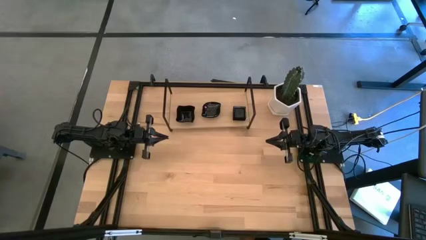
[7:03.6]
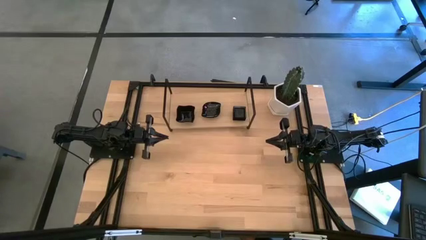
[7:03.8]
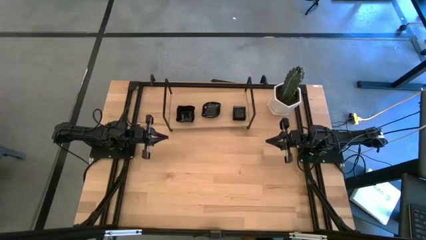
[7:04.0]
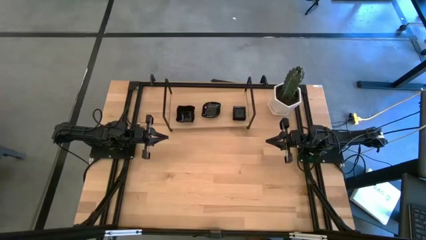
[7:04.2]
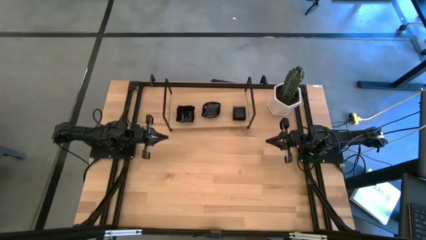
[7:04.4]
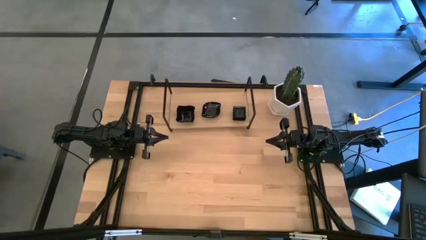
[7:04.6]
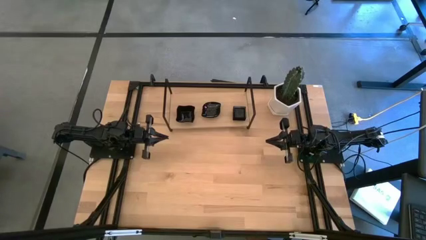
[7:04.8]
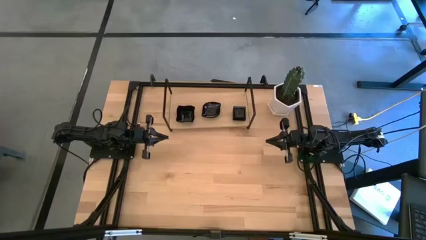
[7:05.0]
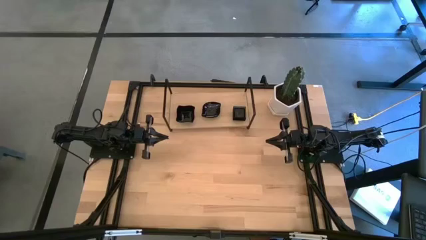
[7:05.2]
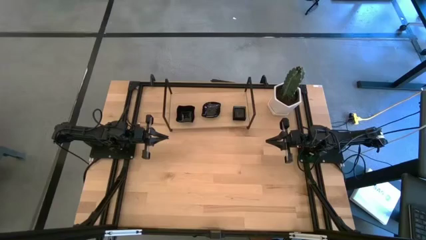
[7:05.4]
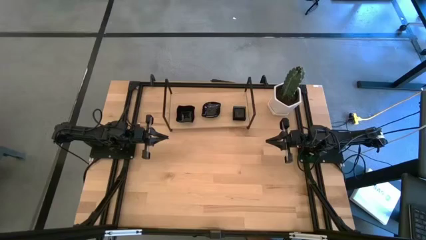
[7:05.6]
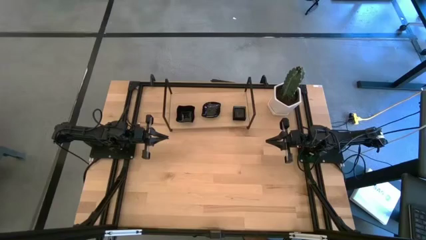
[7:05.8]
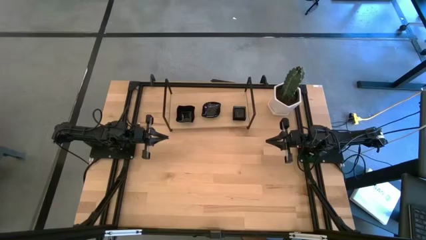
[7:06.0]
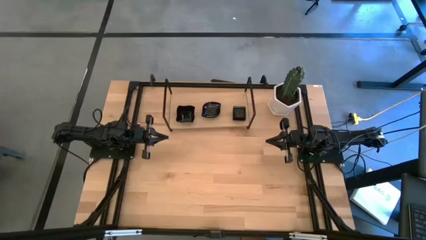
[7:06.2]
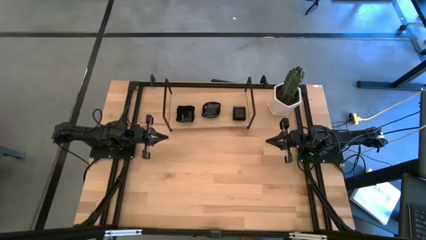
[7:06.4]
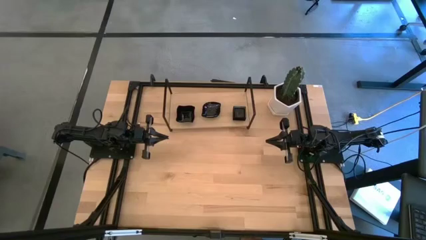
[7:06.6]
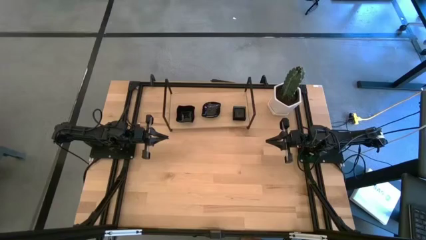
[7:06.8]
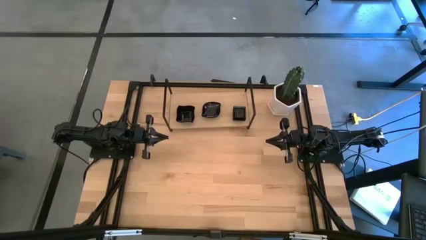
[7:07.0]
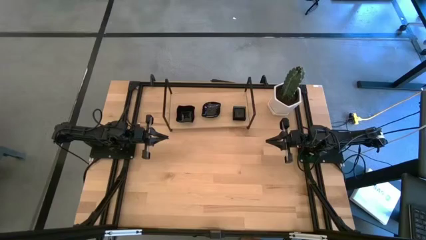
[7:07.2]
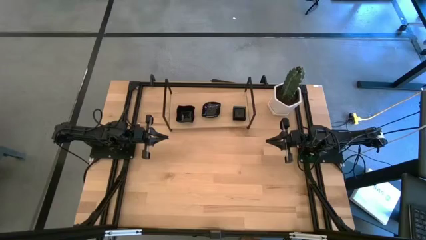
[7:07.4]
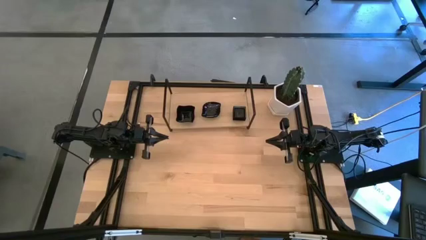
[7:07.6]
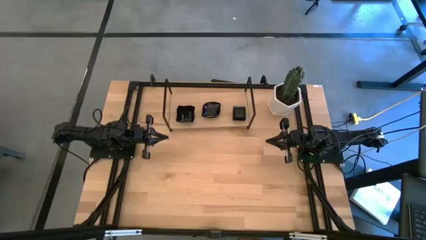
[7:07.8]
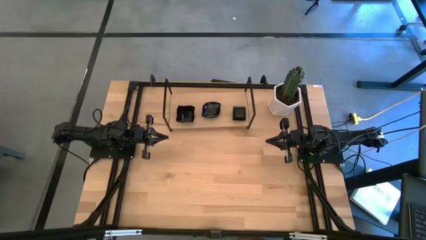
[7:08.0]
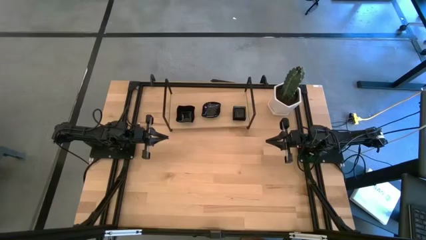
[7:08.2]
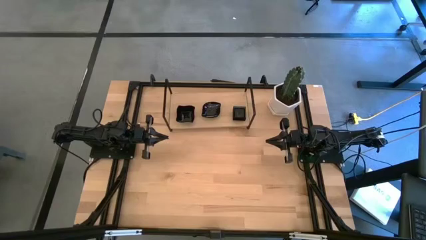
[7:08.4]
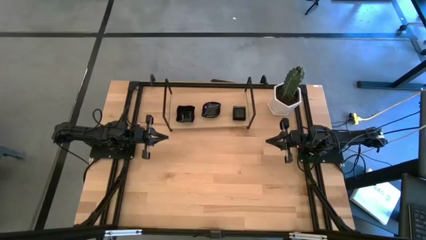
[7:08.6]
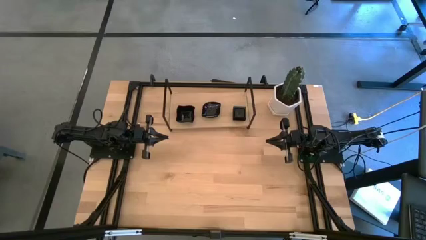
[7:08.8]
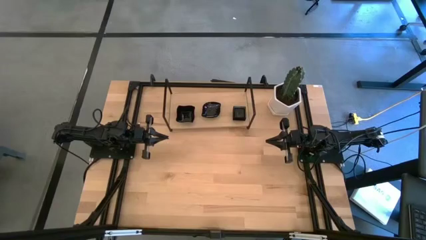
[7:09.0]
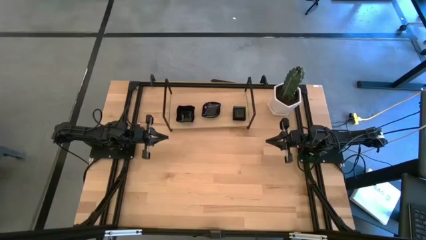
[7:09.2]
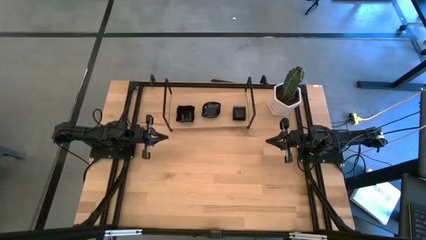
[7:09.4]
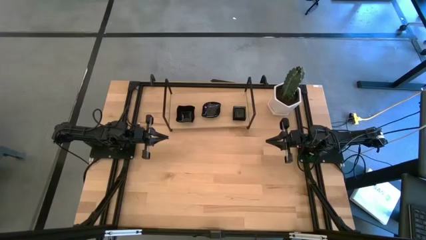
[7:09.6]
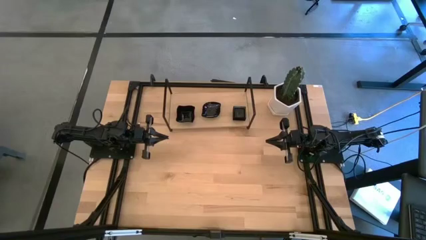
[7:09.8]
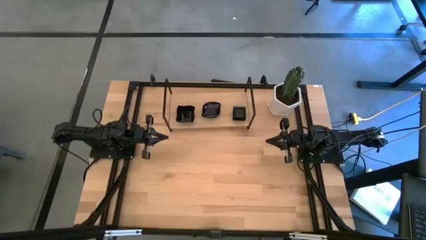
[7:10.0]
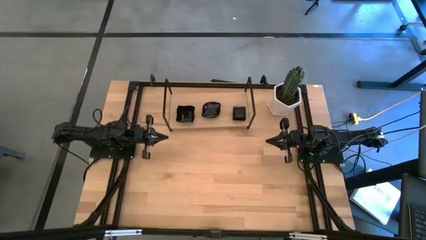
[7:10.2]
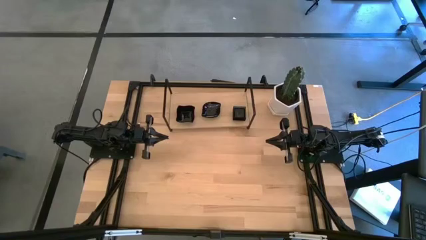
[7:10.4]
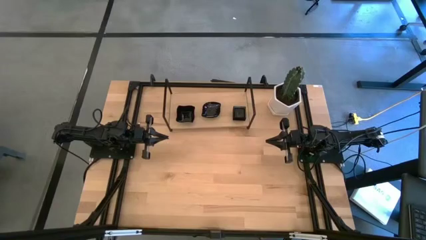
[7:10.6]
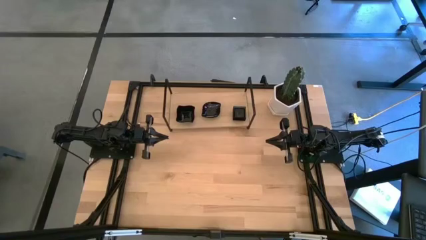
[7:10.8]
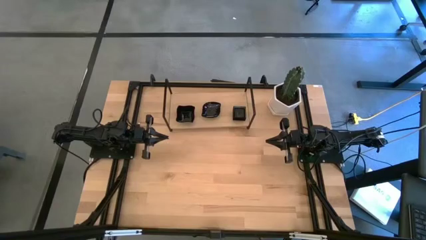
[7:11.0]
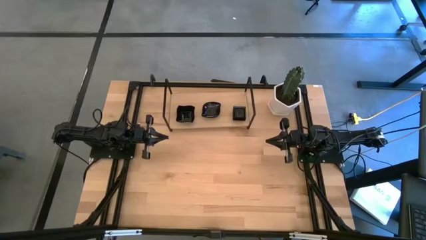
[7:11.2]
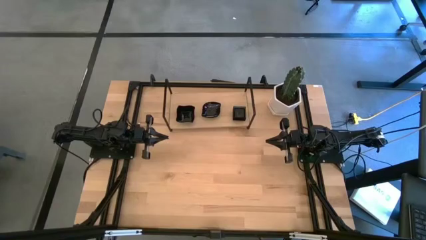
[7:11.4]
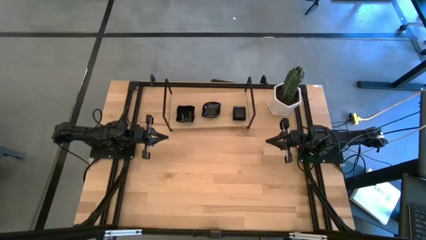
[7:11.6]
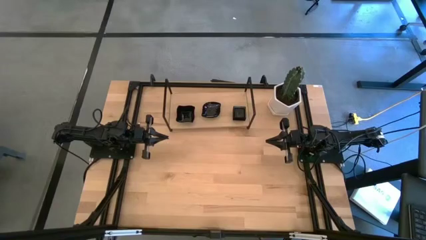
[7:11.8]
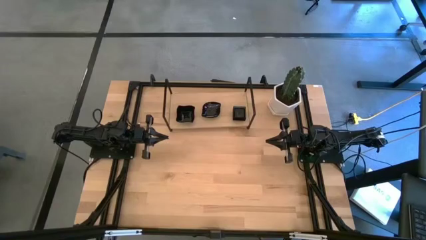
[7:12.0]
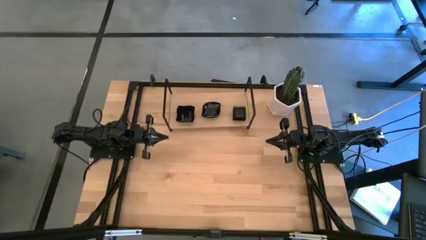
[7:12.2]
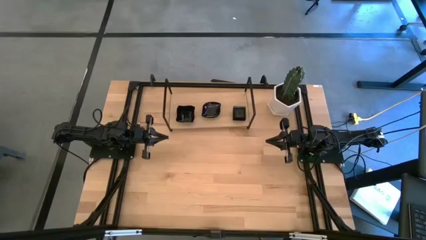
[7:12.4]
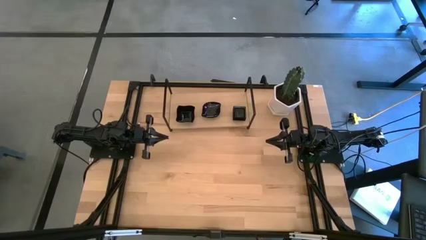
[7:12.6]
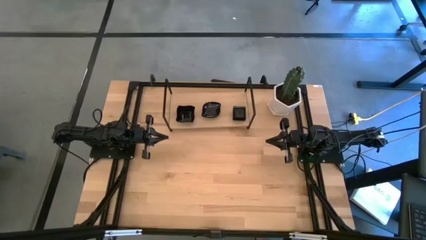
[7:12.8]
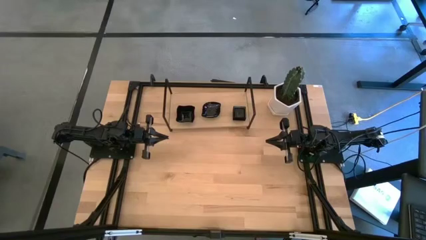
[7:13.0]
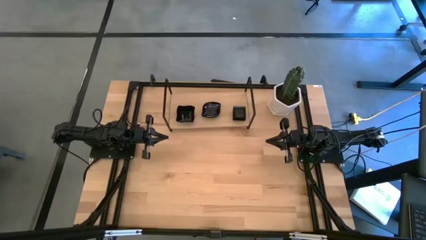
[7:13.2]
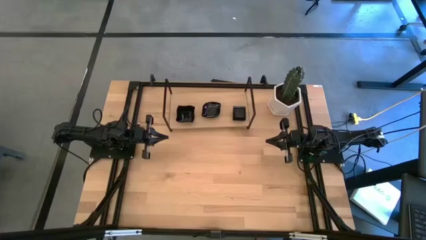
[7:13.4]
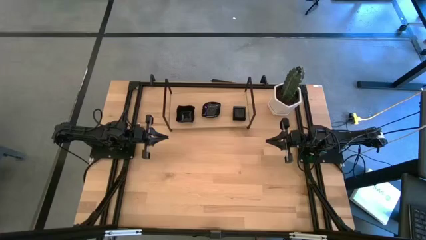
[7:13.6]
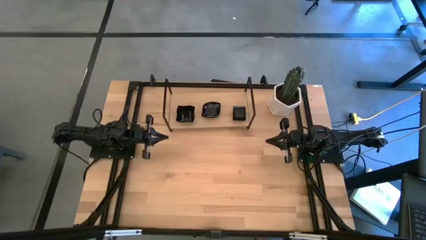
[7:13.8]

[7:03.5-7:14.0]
Task: Pick & Place Mini shaped plates
Return to Home Position

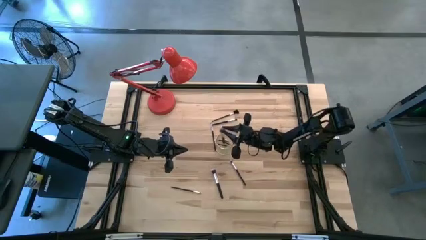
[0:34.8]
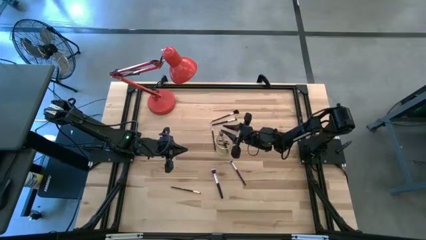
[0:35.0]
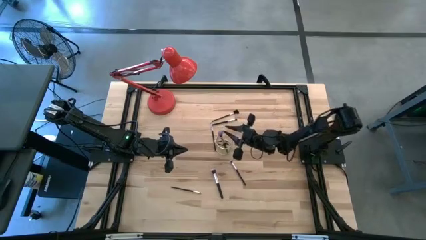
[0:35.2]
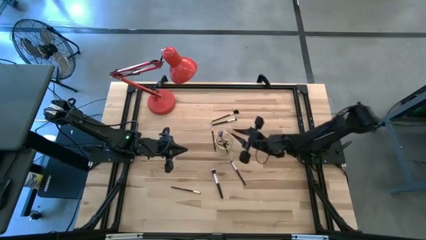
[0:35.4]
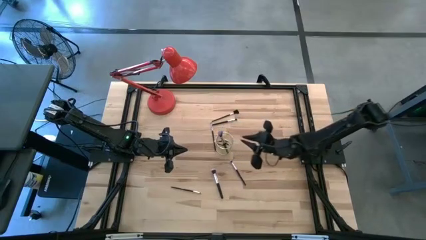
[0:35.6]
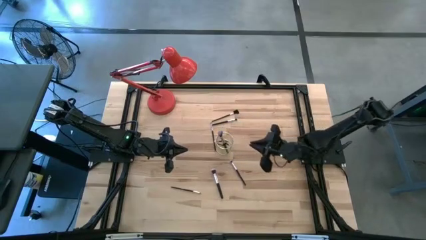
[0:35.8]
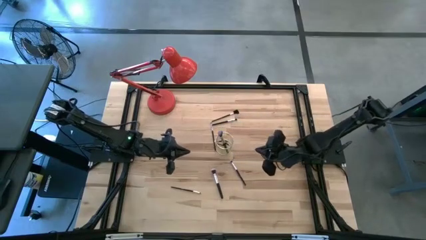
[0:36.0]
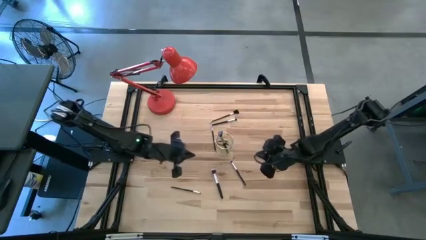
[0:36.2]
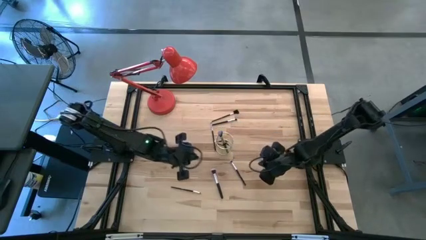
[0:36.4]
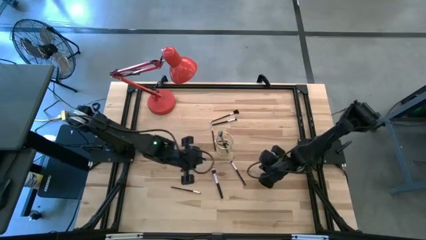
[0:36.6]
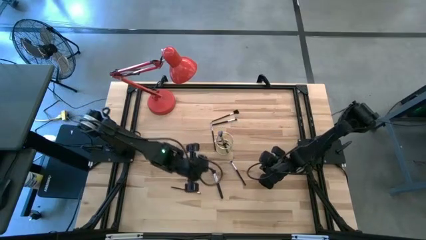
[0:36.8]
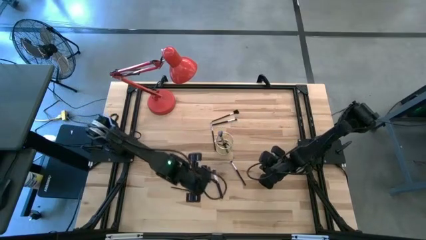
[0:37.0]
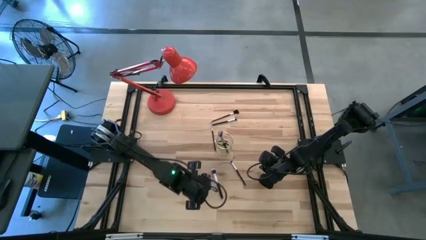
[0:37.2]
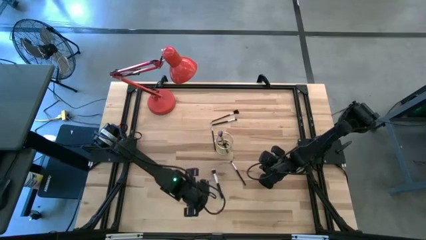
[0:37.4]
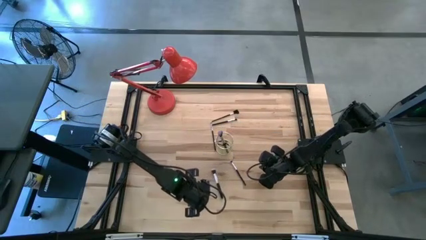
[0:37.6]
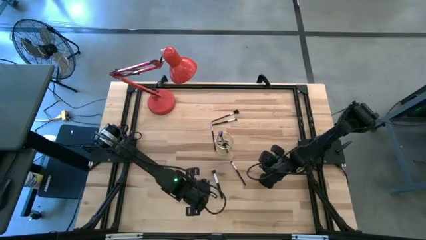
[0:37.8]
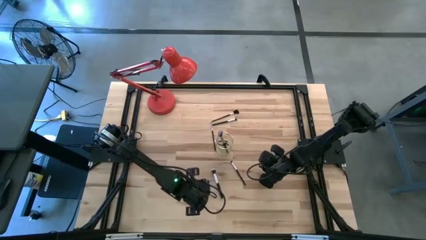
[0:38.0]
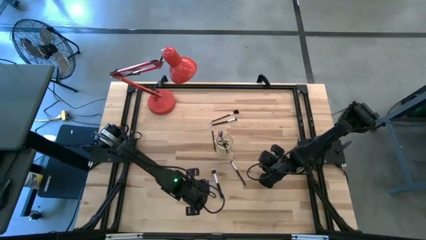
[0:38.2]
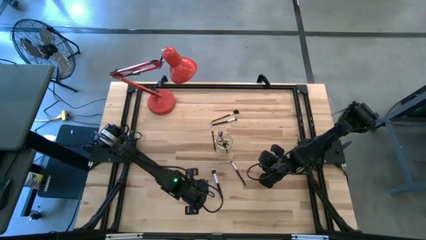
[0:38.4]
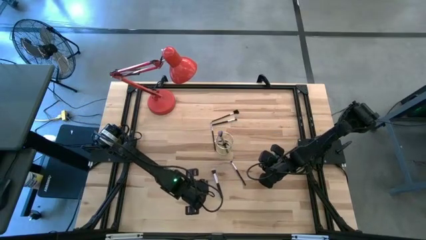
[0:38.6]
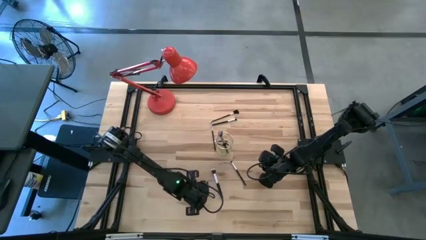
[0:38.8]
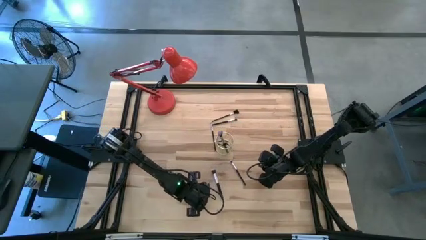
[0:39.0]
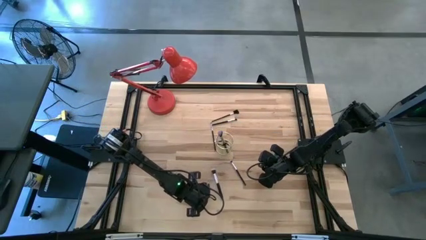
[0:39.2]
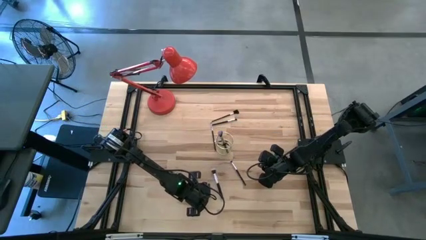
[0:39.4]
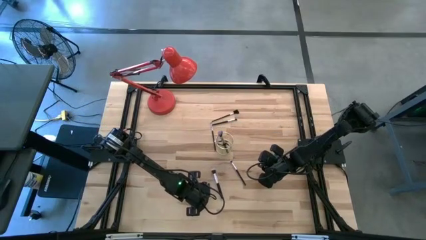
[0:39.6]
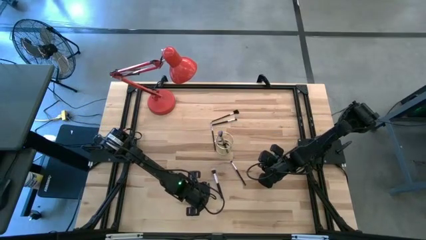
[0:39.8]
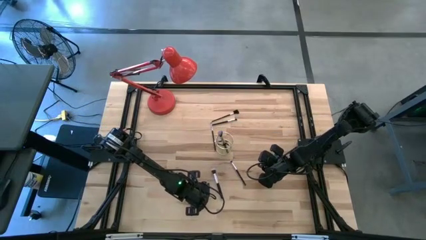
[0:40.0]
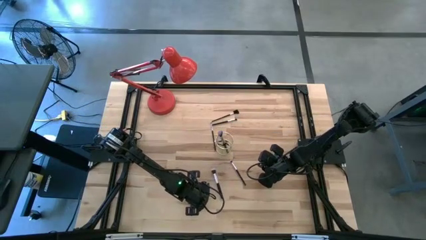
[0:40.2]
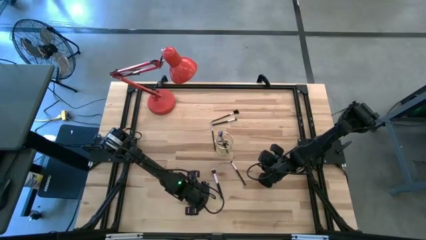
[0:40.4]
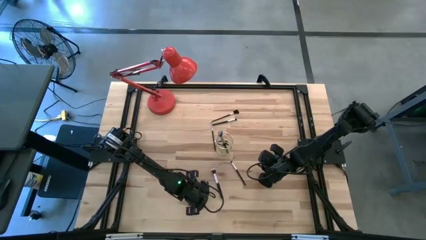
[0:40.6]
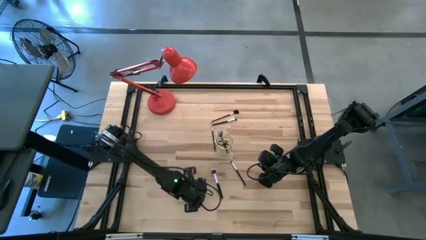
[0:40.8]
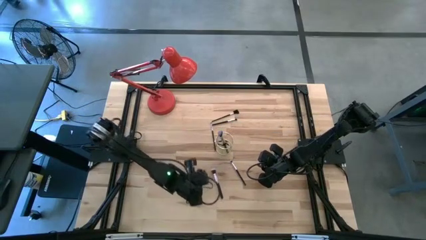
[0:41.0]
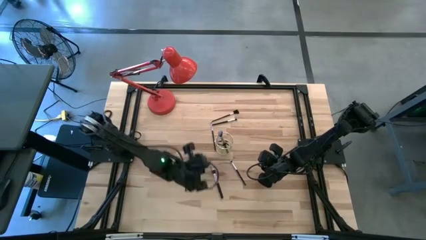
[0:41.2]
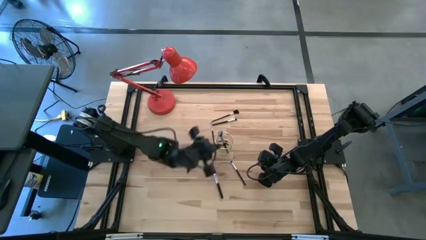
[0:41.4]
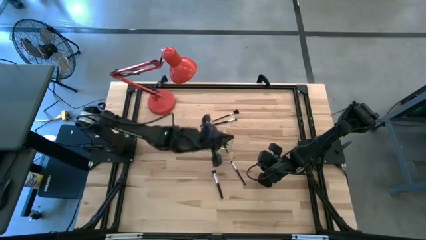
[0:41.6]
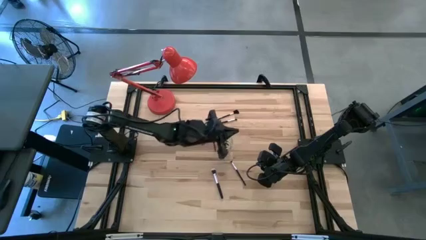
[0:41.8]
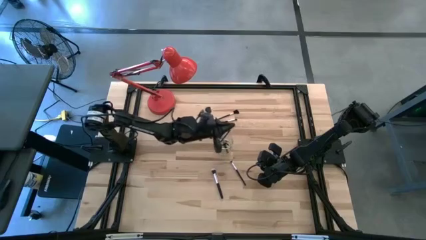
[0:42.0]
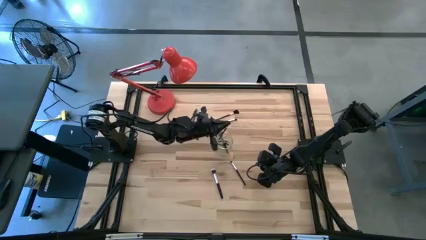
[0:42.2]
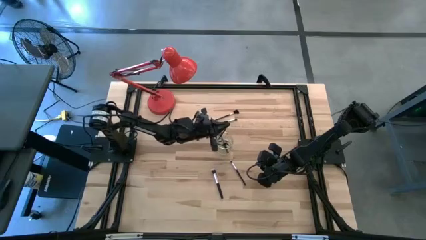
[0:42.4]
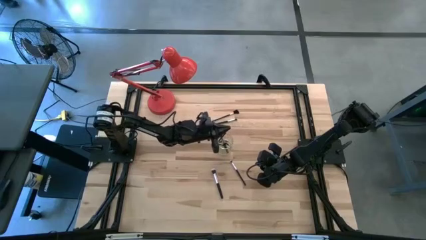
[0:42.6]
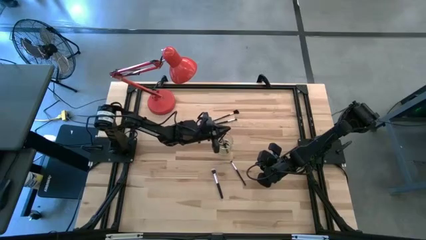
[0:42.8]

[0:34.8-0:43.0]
Task: Put items in baskets/containers
Put the eyeshadow brush into the wire organizer
